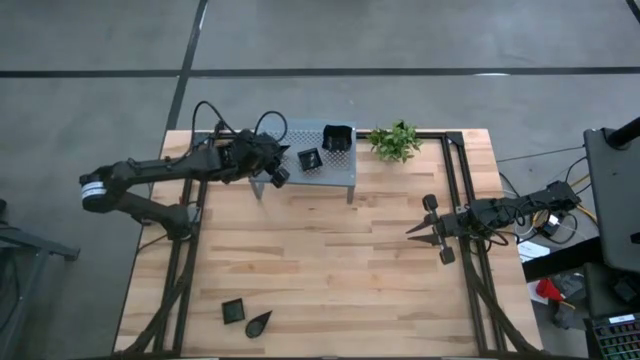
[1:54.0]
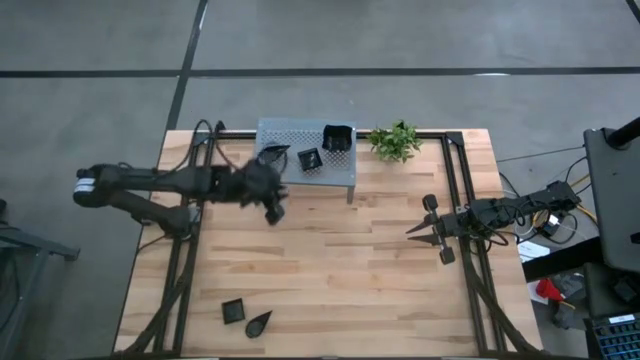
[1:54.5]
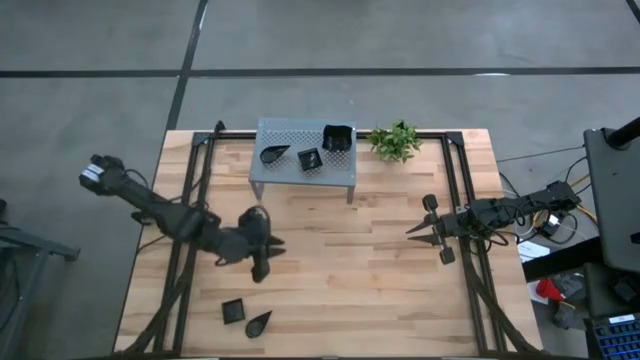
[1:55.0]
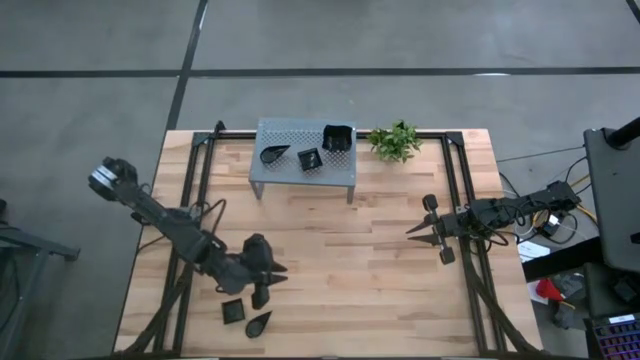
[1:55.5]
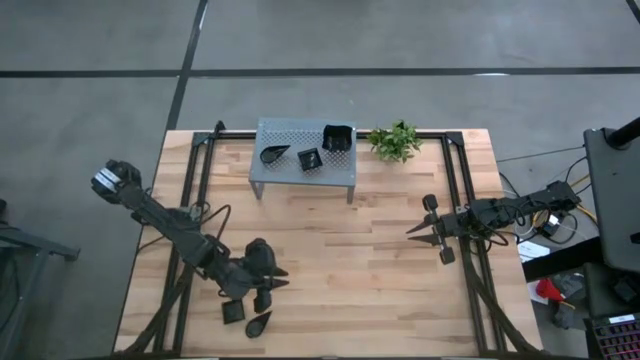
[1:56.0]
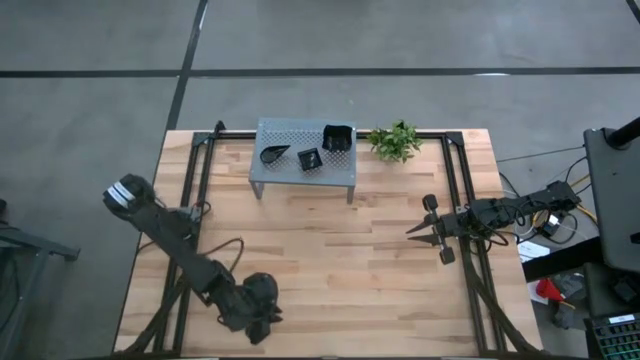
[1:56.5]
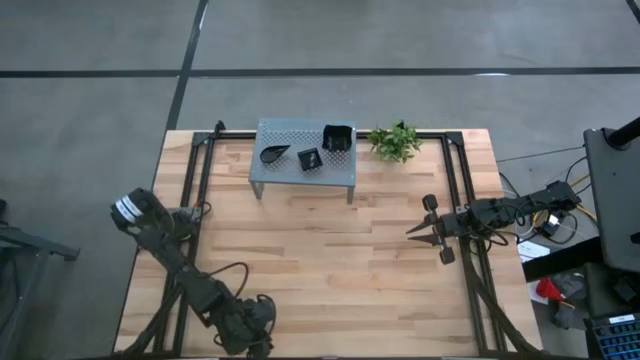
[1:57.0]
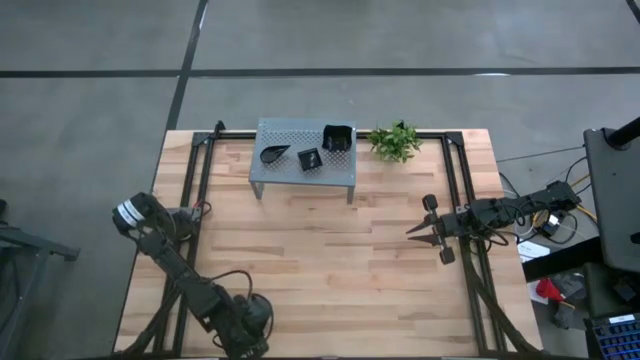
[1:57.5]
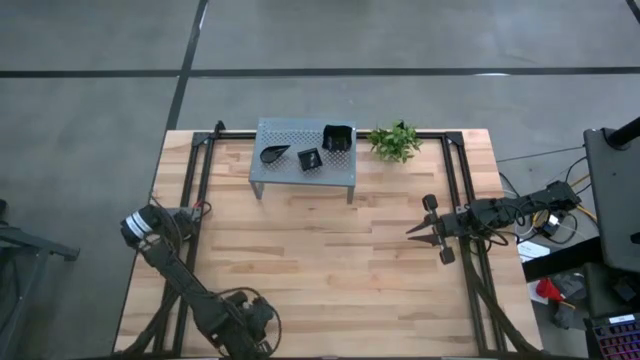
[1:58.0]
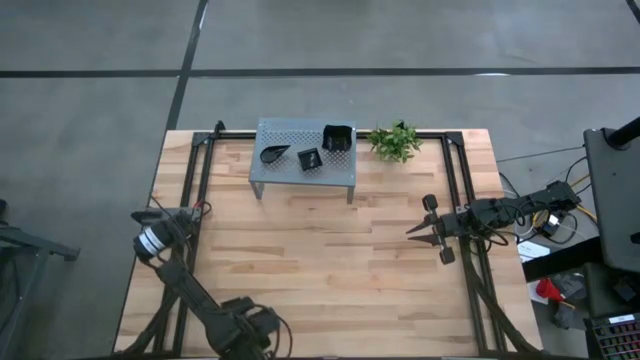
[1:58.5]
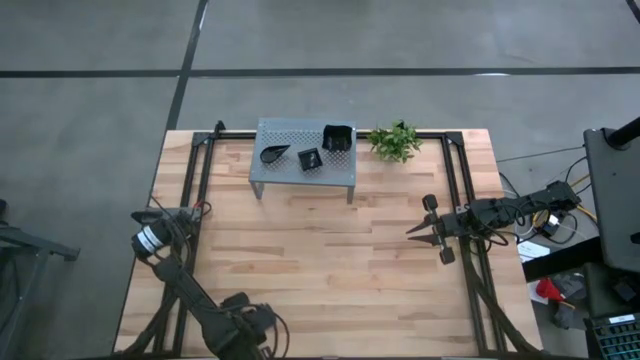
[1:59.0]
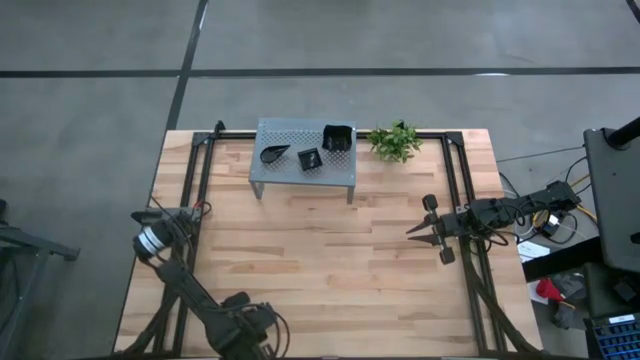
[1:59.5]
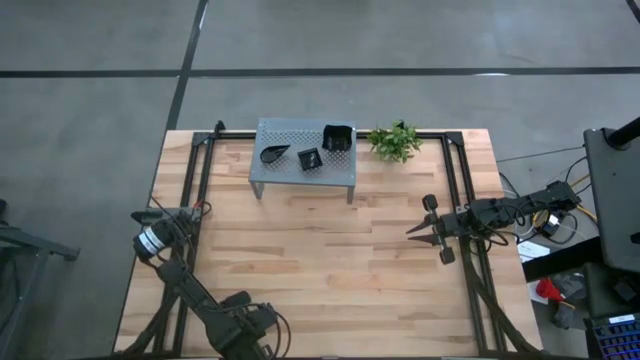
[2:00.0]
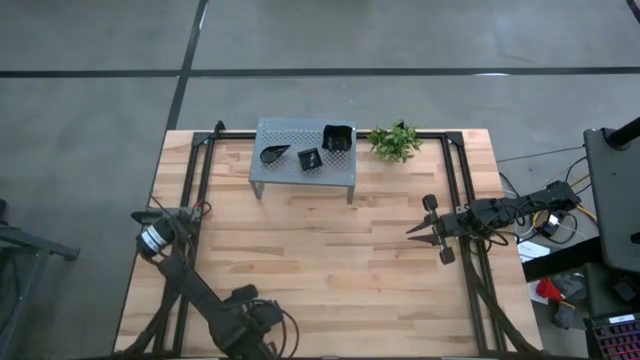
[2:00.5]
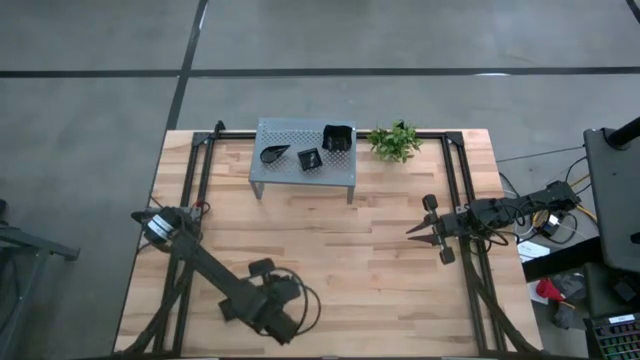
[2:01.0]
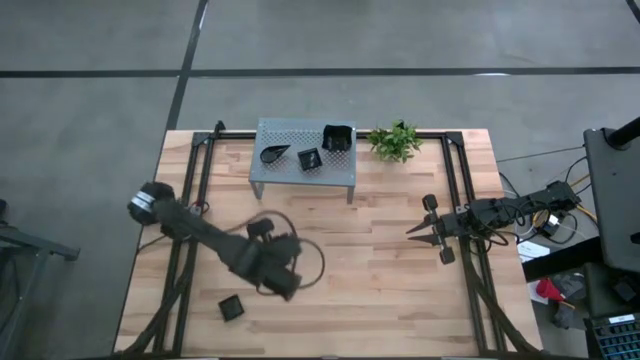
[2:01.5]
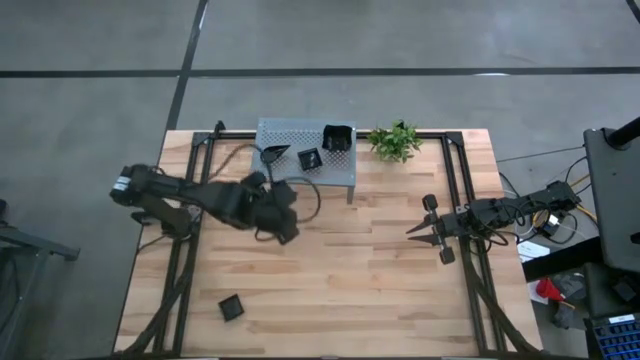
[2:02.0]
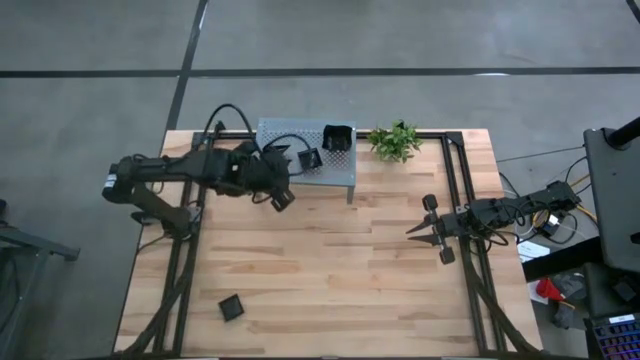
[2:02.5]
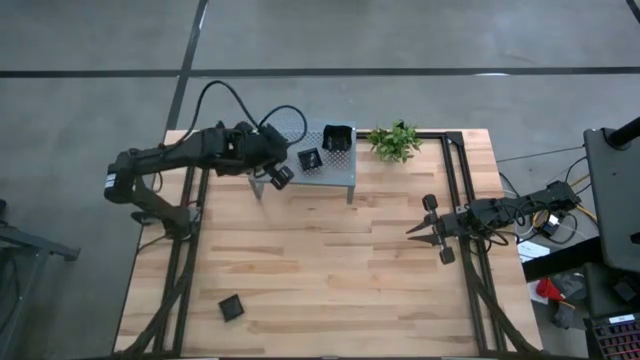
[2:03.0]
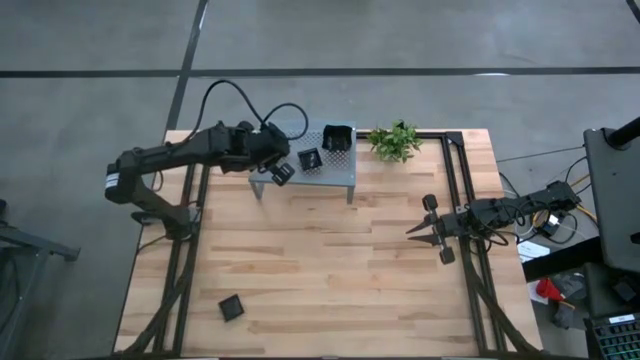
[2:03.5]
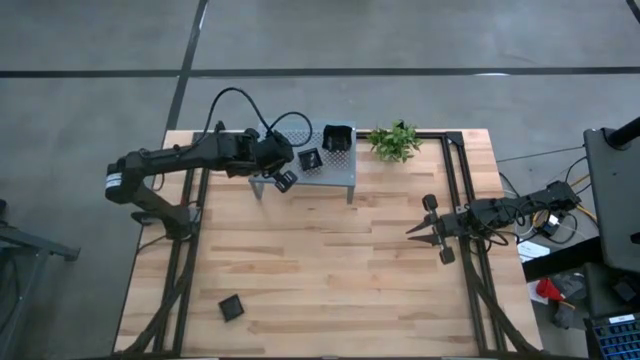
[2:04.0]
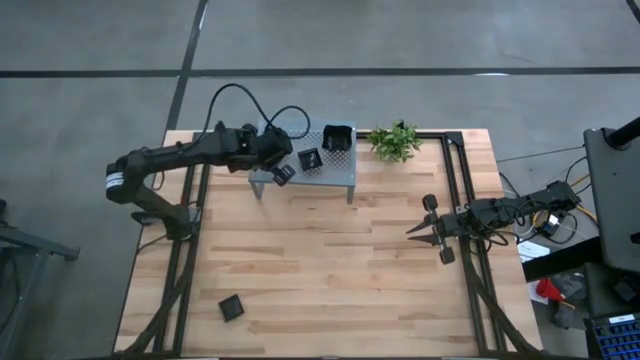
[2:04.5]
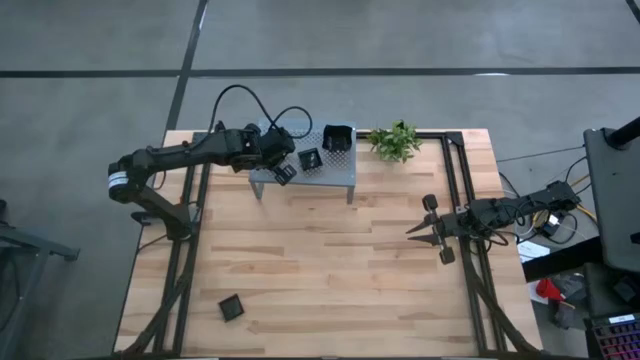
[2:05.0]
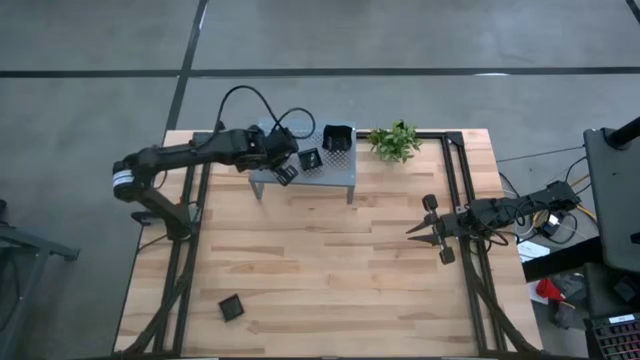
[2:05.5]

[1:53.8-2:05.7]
Task: Pick & Place Mini shaped plates
Stack the black drop-shaped plate on top of the black drop-shaped plates on the shelf

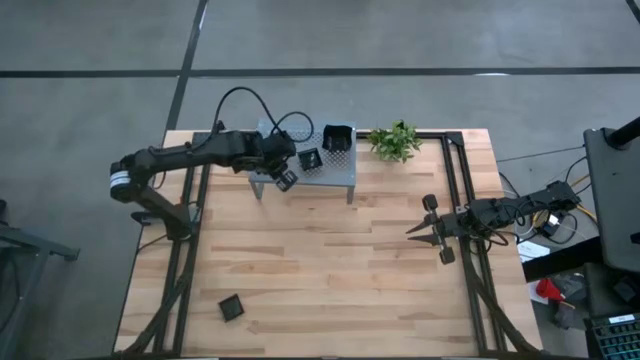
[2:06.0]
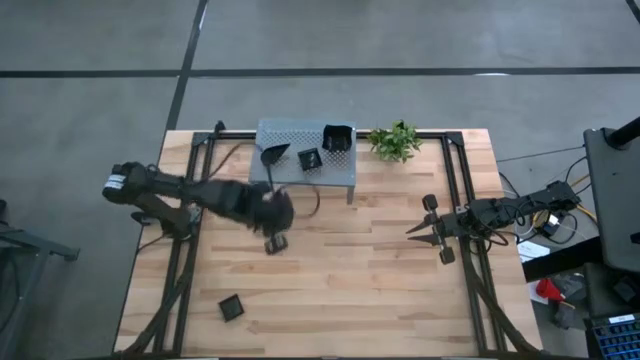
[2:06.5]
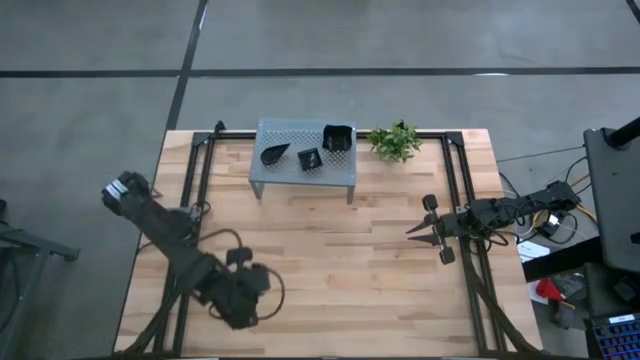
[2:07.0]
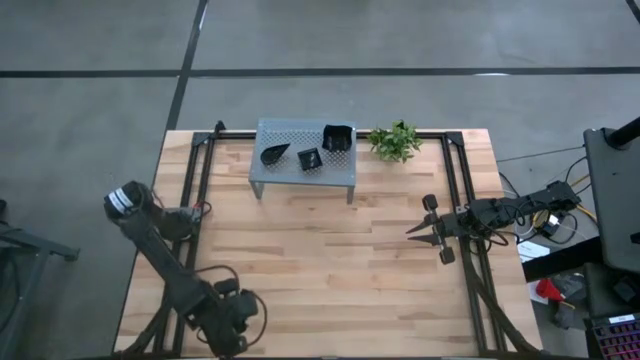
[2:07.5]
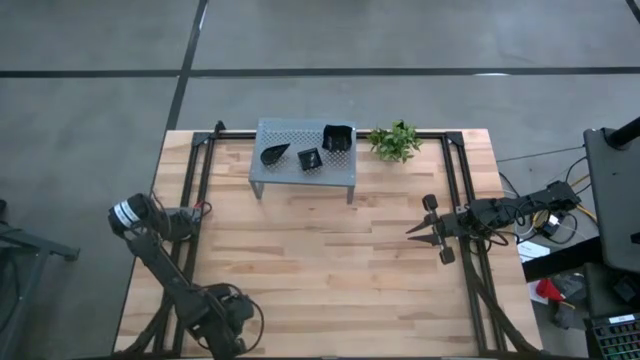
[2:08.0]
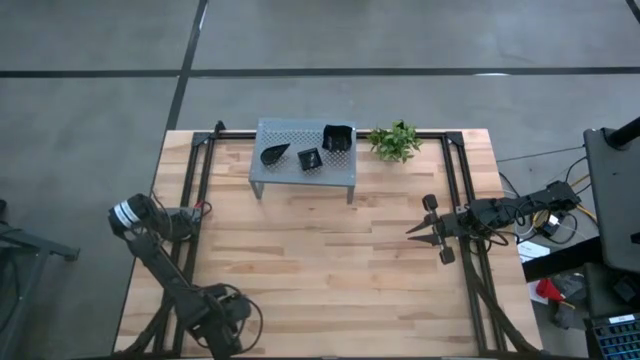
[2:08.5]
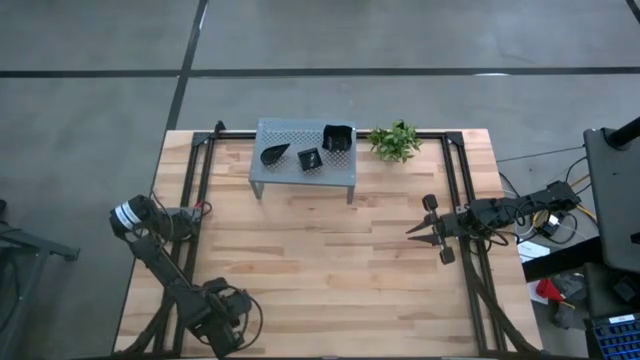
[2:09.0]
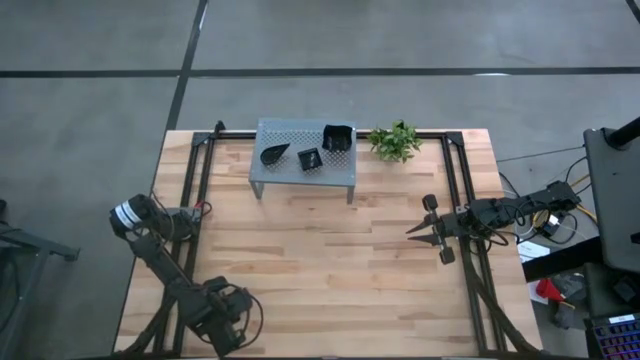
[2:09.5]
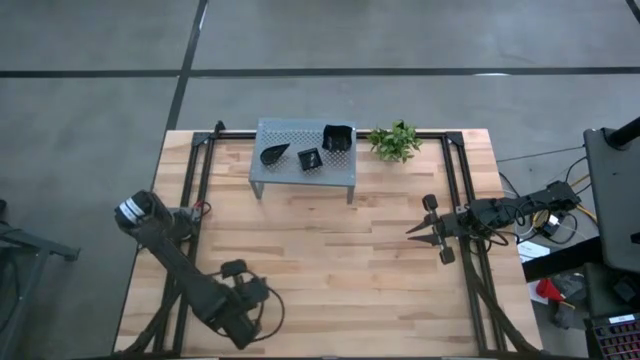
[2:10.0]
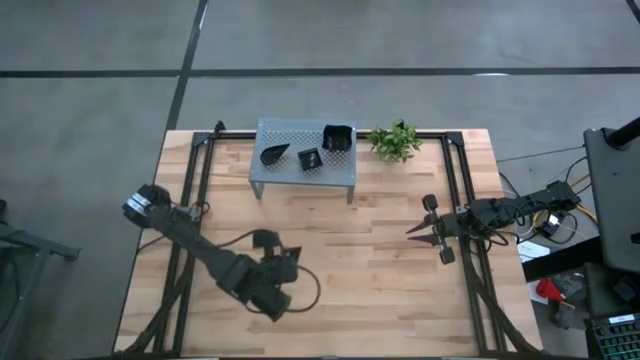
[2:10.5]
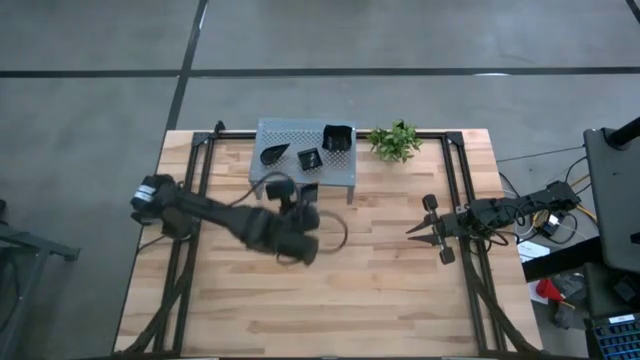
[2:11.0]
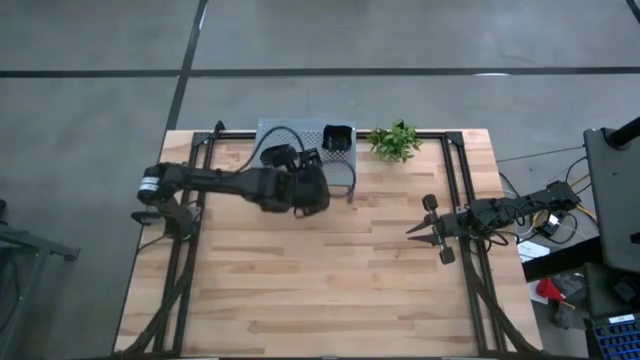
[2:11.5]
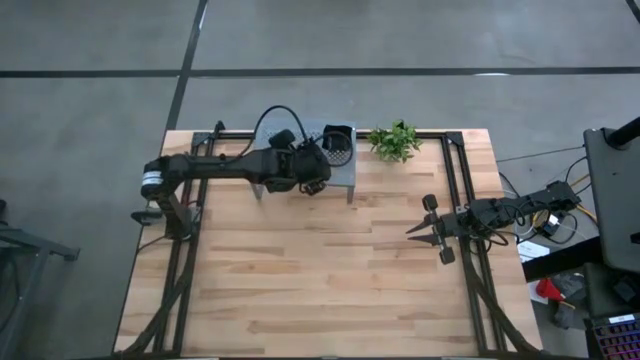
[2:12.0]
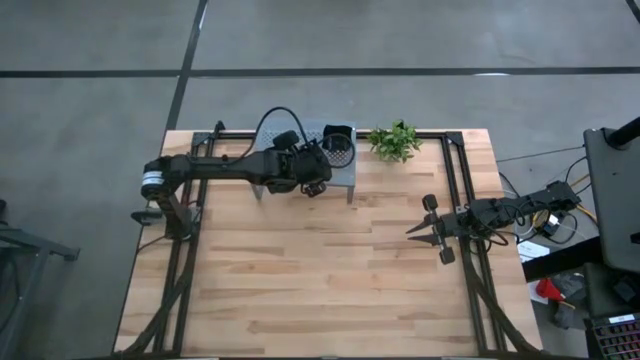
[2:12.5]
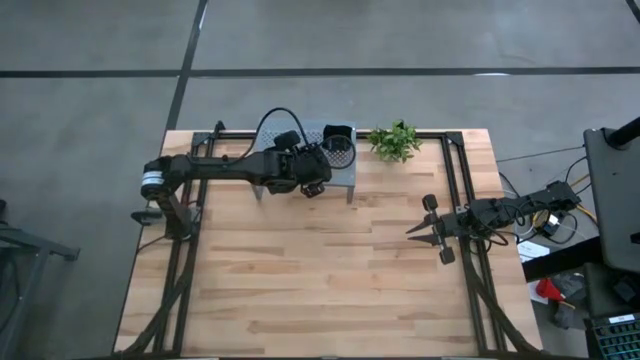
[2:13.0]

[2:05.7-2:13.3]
Stack the black square plate on top of the black square plate on the shelf

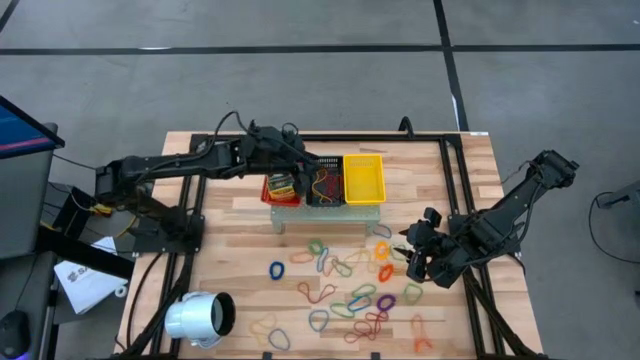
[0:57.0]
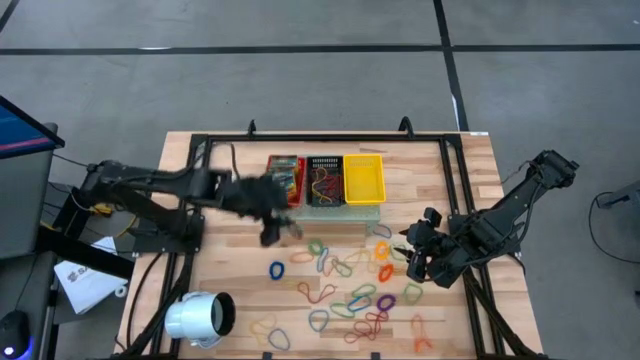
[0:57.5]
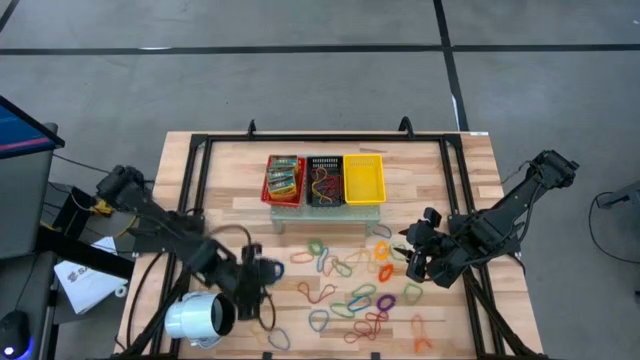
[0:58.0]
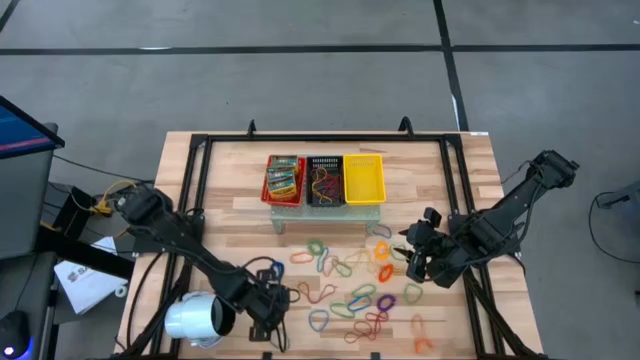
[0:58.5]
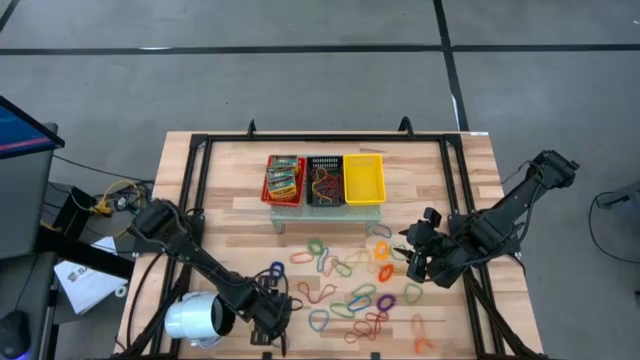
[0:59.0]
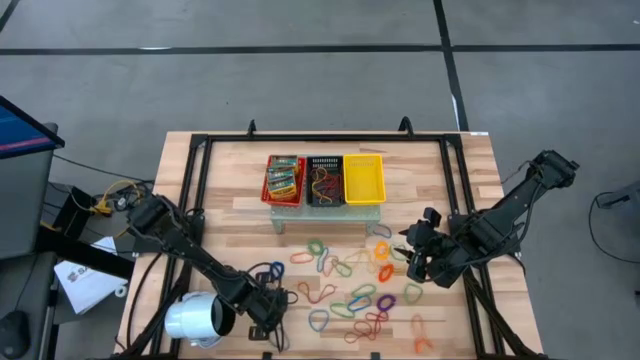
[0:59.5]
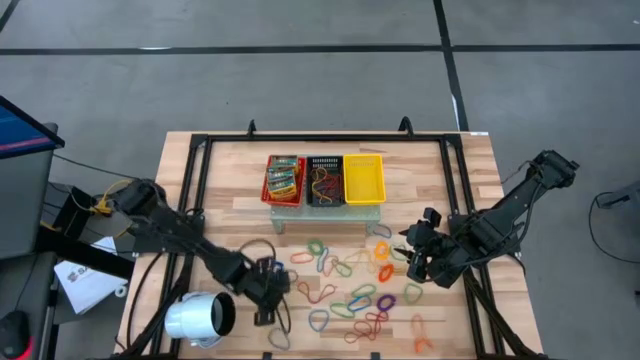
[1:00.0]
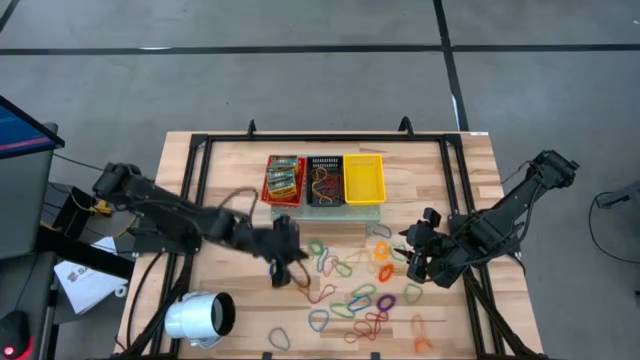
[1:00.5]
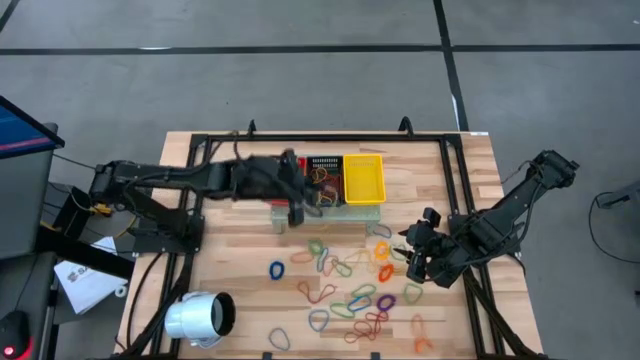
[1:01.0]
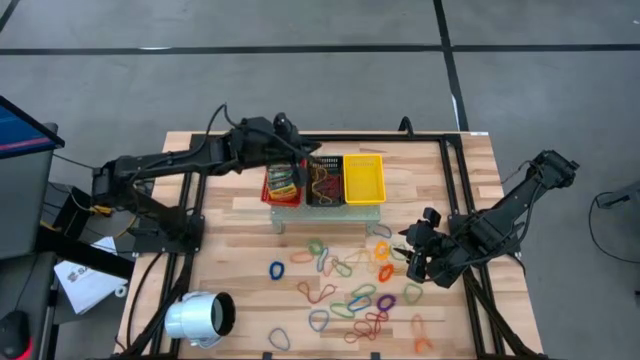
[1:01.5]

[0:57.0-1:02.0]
Task: Pick & Place Office Desk Supplies
Put the yellow rubber band into the black bin on the shelf
